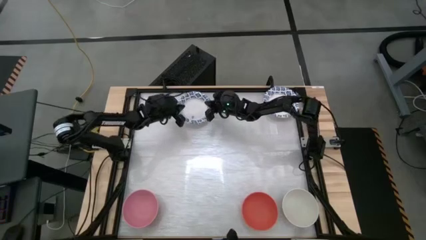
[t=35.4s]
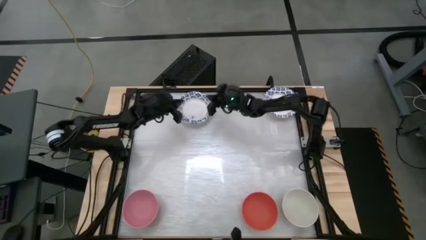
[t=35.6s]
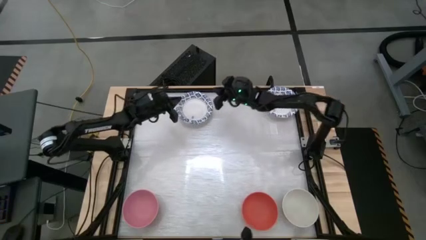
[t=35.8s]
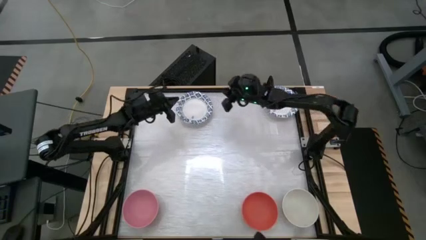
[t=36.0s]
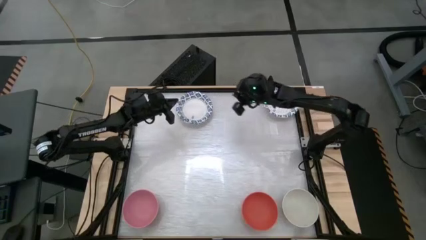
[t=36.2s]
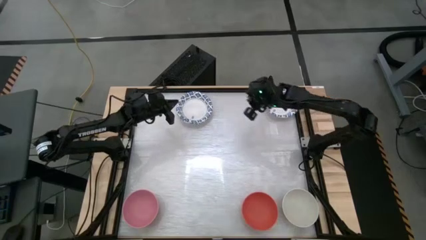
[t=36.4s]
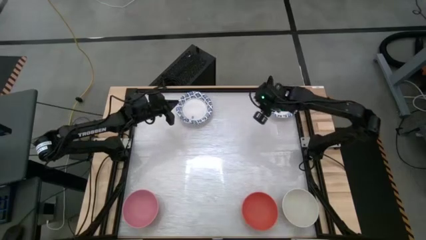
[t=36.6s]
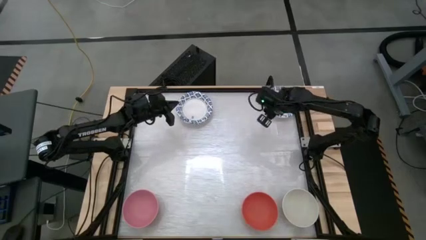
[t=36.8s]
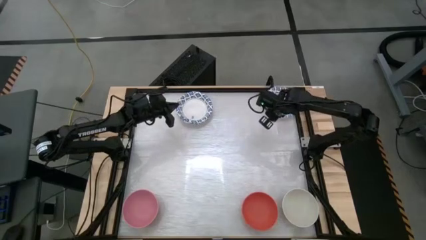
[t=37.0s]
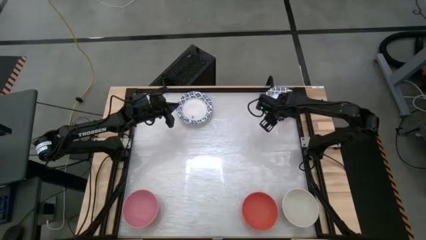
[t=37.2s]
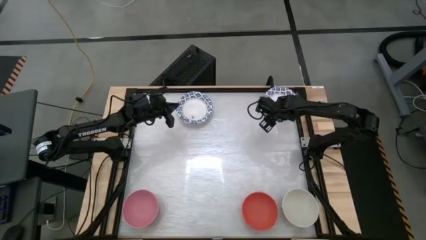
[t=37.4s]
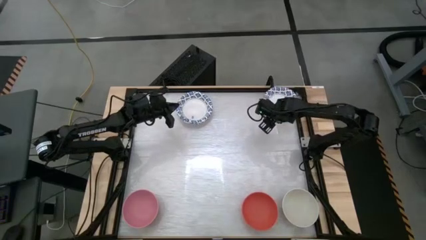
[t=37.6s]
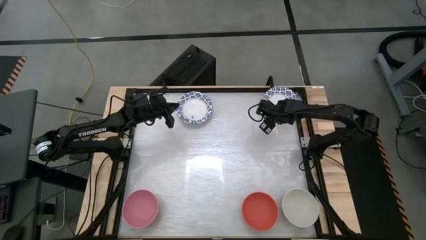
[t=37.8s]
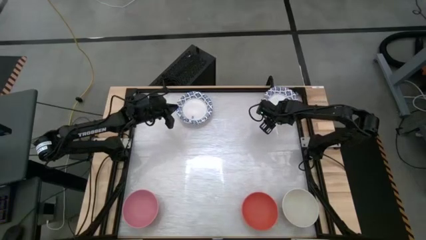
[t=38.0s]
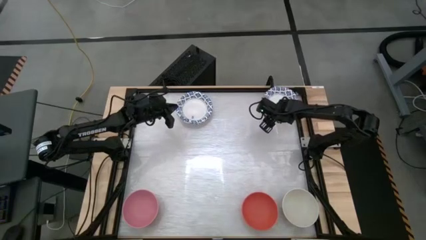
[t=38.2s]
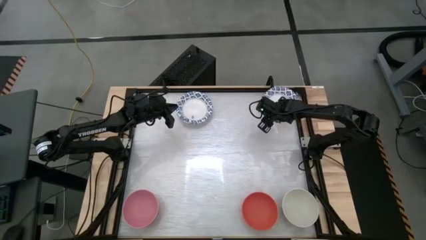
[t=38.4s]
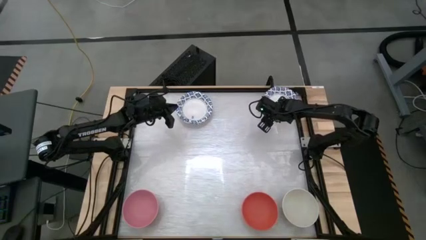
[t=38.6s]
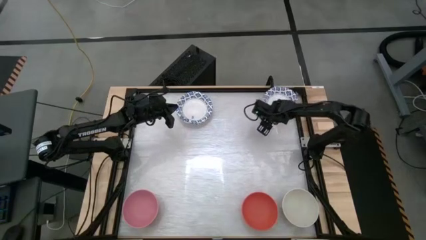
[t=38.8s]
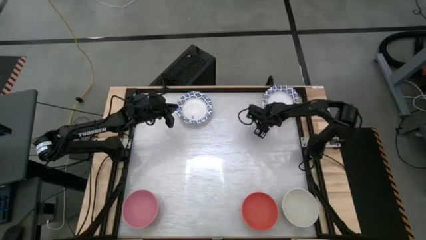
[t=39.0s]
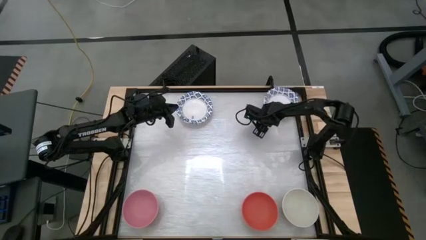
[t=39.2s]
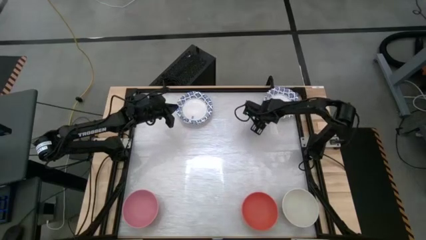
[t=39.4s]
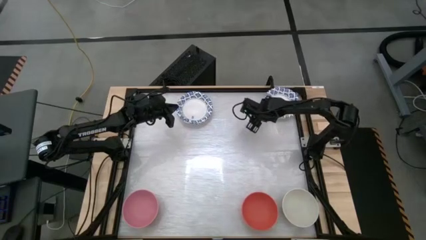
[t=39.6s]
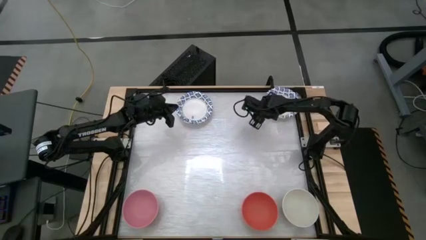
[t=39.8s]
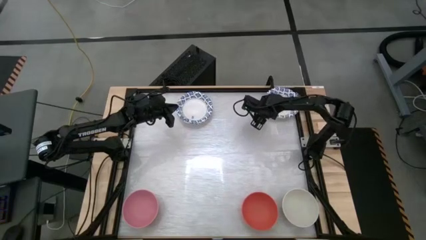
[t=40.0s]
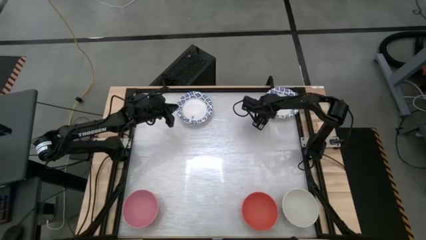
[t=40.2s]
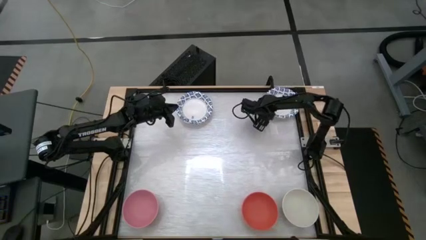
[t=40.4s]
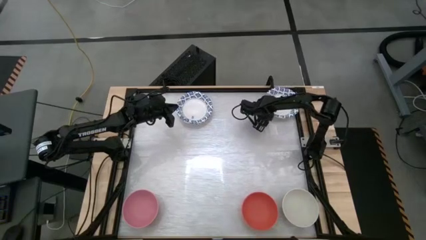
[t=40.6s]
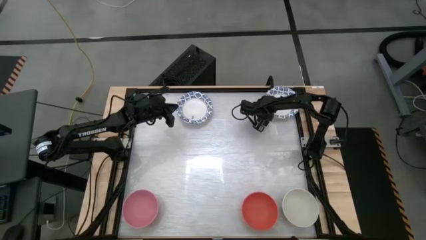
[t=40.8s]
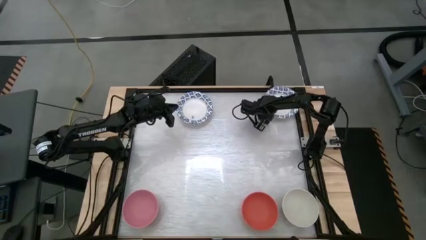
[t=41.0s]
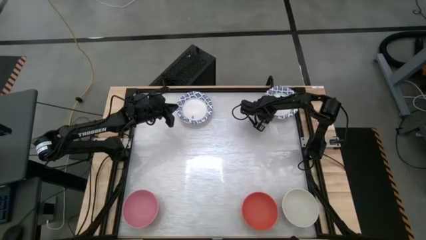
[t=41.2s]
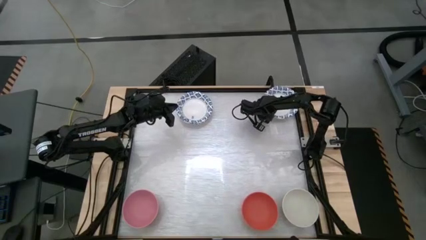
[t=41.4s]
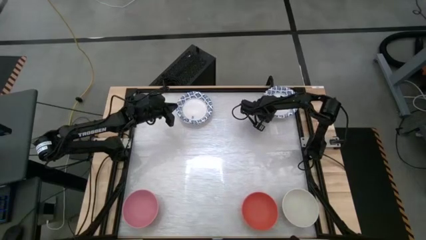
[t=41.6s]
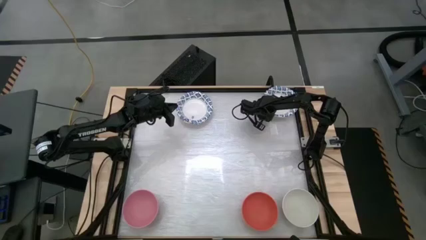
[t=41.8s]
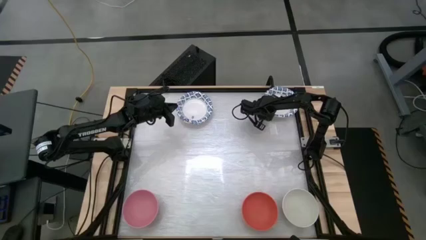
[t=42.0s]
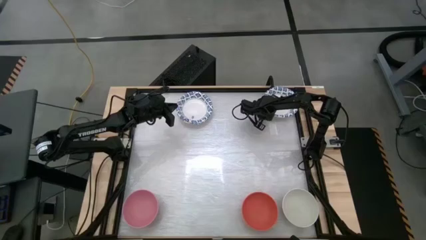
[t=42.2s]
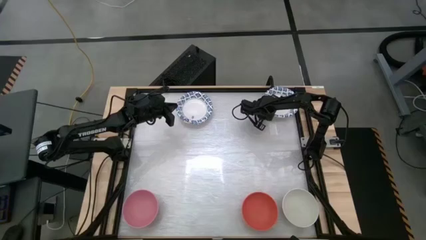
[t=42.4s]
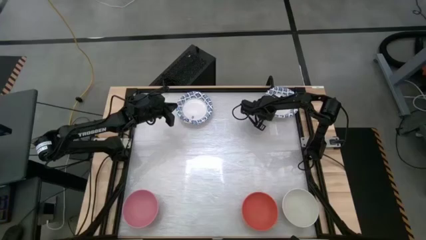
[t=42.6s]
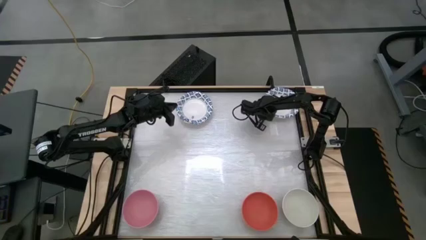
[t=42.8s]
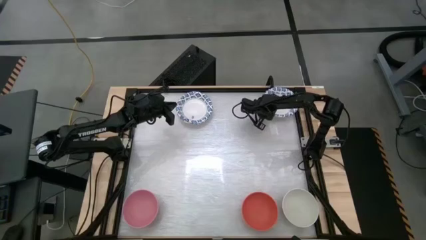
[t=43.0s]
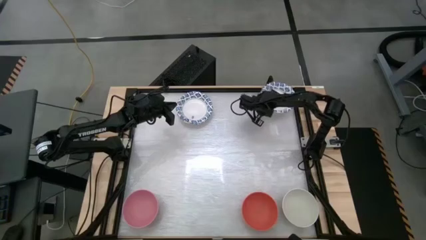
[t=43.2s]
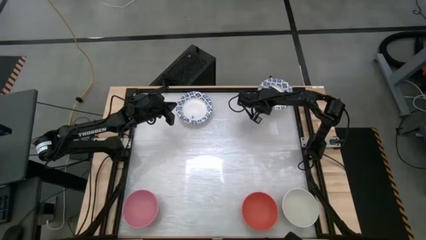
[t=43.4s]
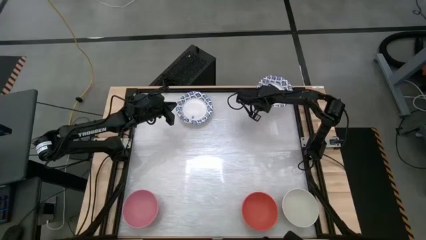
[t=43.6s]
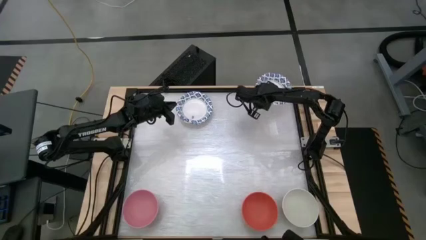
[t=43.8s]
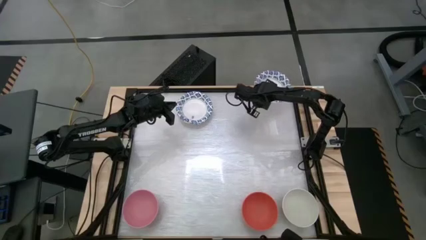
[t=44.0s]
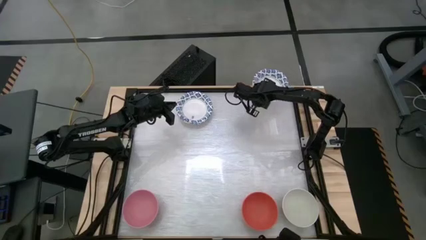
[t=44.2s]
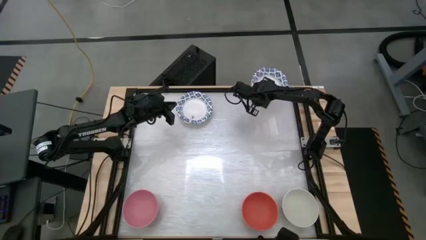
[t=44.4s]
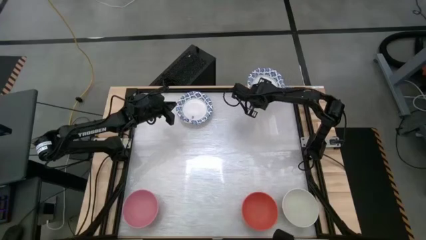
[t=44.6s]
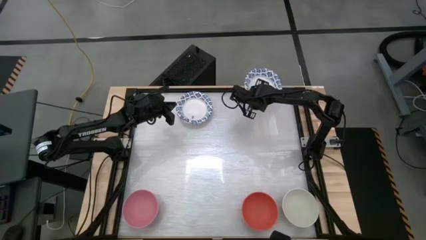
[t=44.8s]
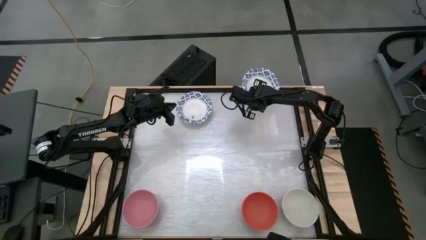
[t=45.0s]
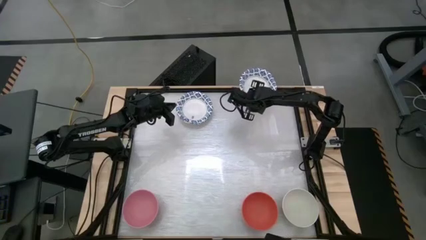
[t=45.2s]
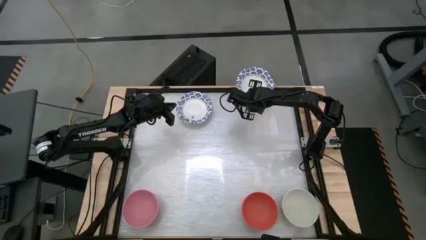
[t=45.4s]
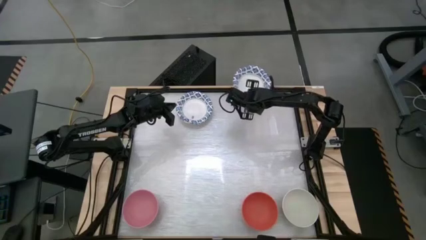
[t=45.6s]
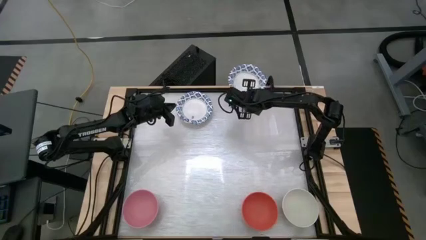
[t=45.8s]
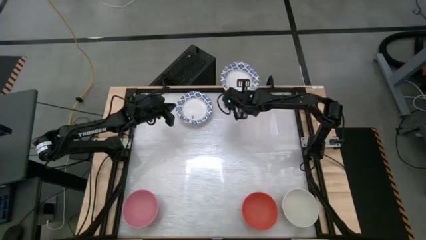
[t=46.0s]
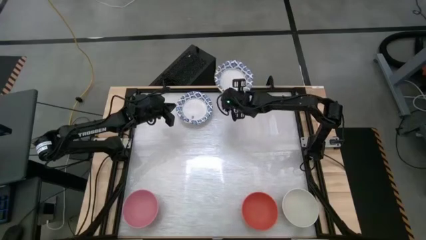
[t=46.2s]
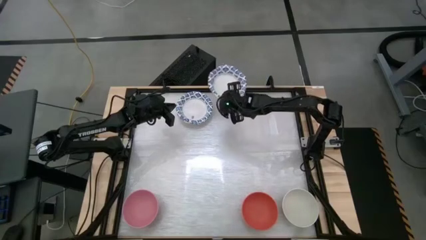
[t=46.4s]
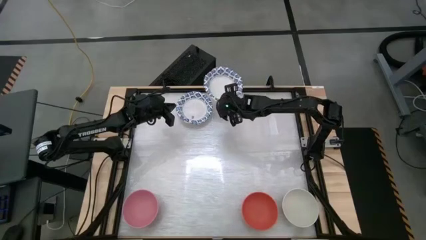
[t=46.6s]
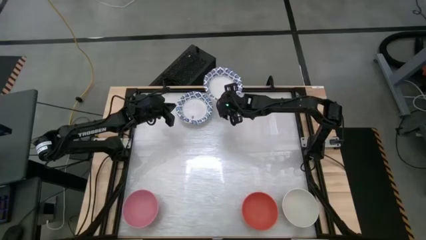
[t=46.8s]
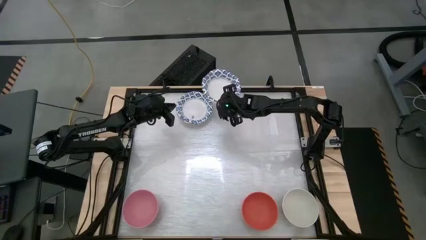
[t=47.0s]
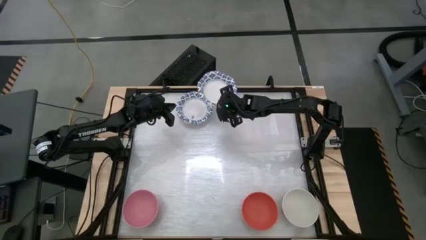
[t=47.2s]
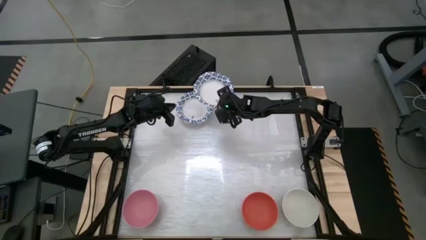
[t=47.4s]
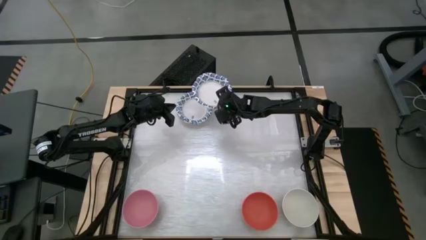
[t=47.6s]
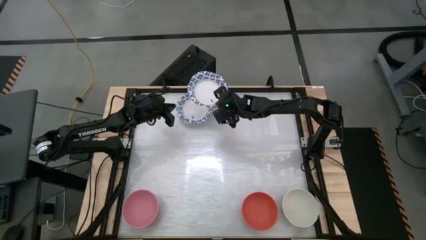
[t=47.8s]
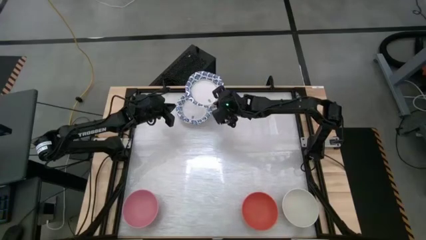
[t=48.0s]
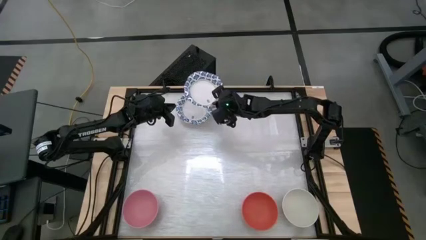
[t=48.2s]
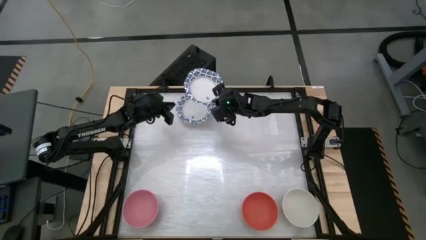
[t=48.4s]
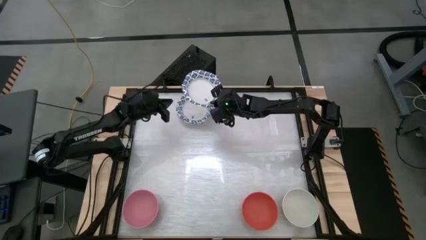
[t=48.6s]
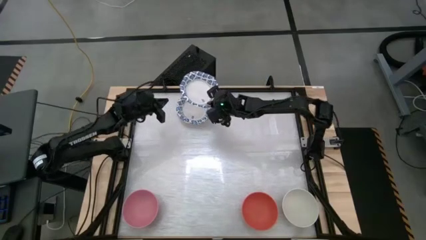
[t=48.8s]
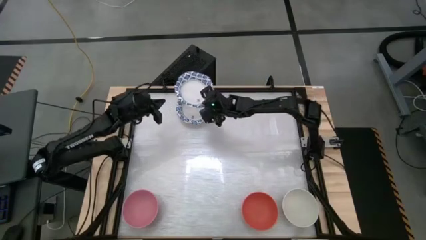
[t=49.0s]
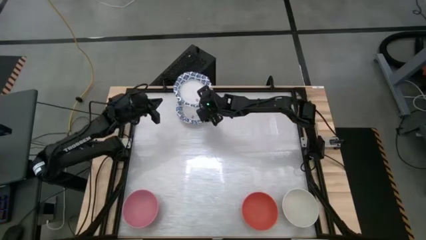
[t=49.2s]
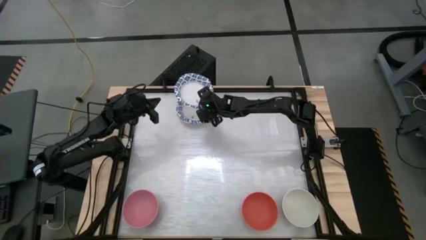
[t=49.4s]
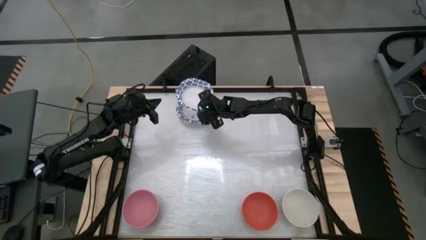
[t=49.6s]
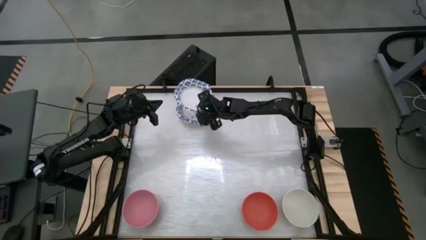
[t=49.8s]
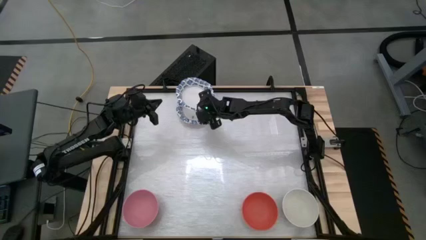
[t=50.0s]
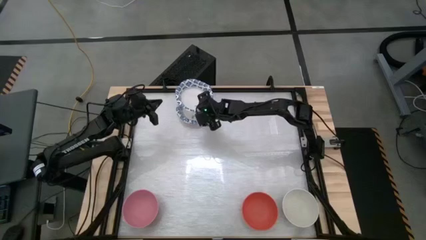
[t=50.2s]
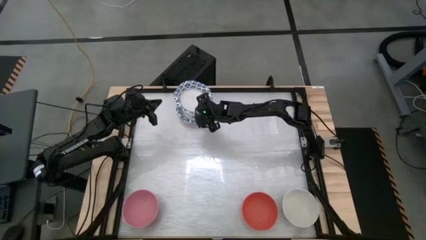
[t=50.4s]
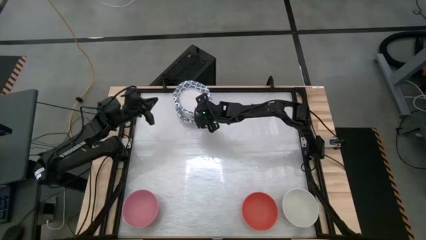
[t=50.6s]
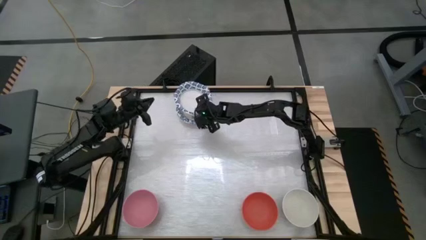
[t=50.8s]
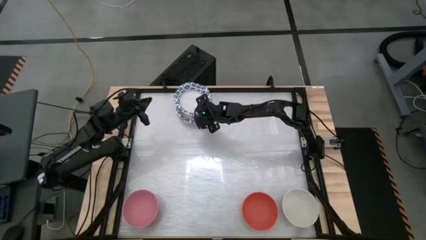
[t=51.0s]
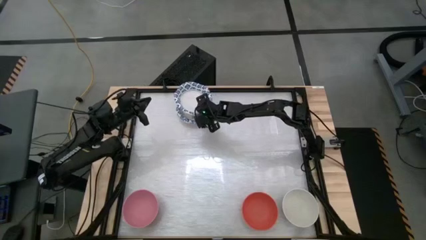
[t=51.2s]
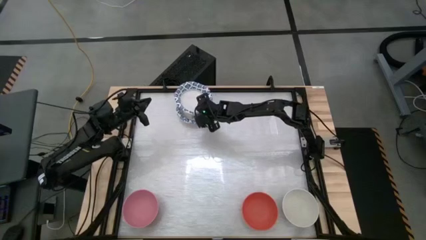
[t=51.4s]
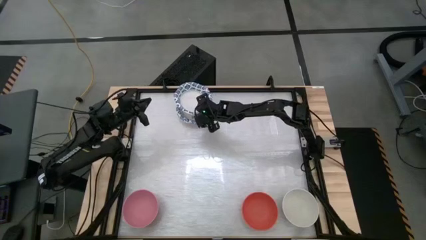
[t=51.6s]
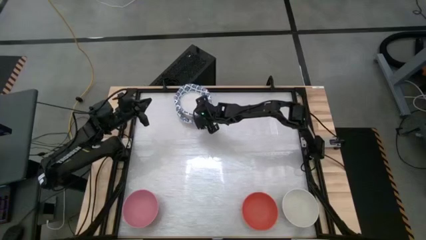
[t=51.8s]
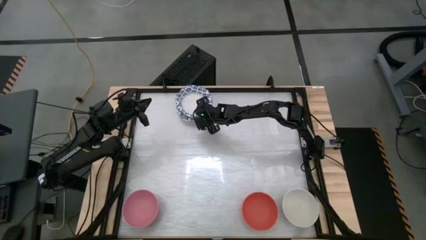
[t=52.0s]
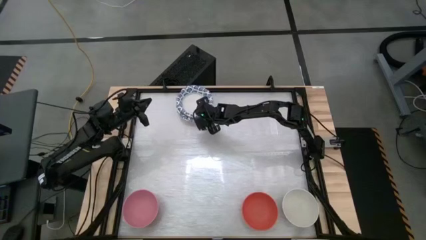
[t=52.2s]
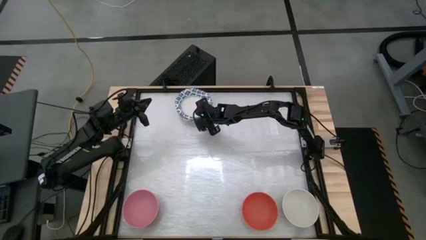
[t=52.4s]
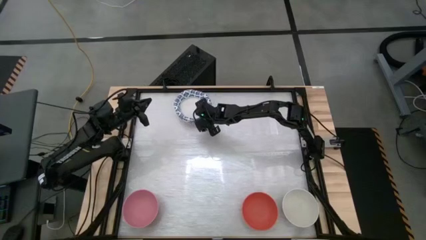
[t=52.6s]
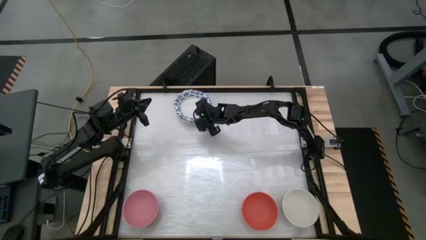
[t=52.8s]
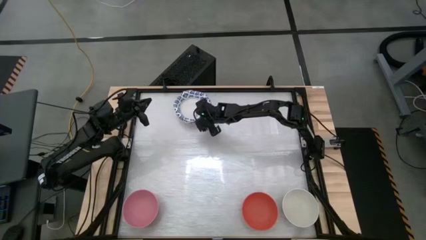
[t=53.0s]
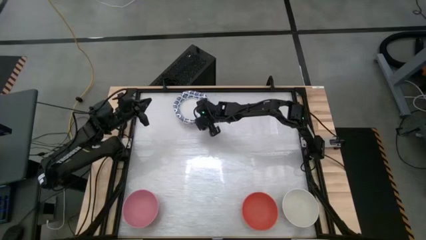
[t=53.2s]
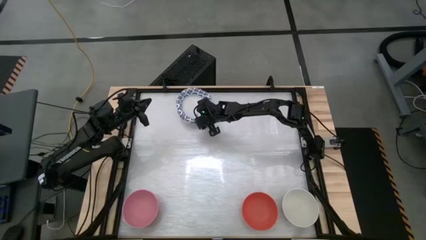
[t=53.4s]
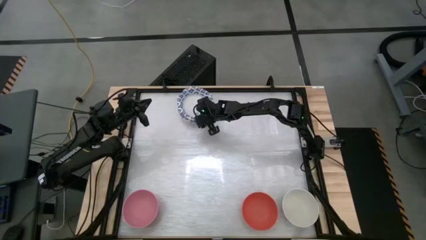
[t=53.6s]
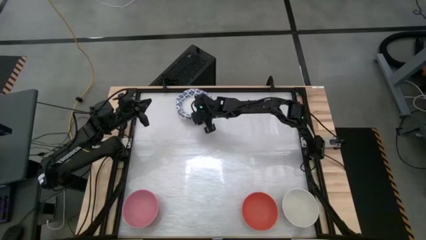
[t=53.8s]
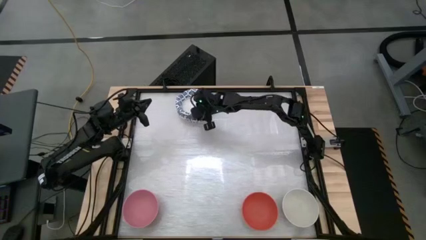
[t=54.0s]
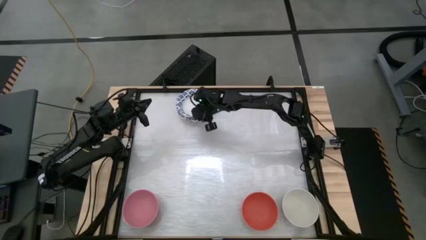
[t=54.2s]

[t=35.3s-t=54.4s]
Stack the blue patterned bowl on top of the blue patterned bowl
